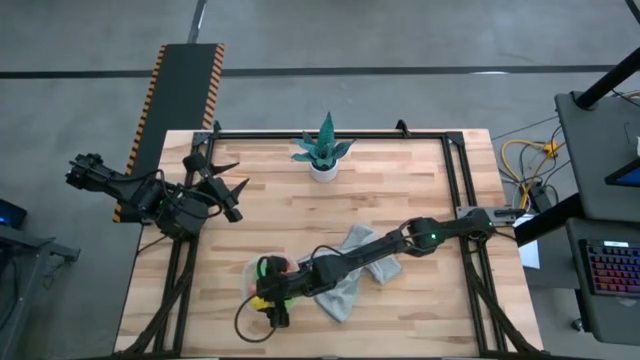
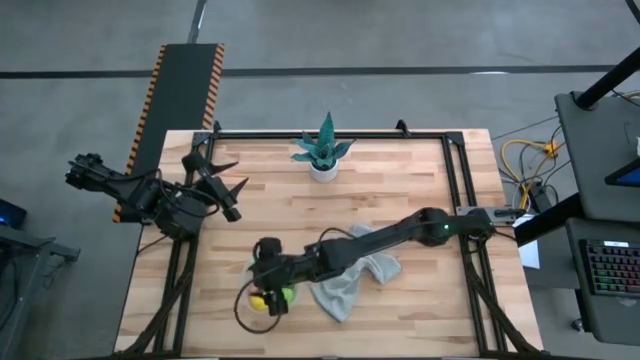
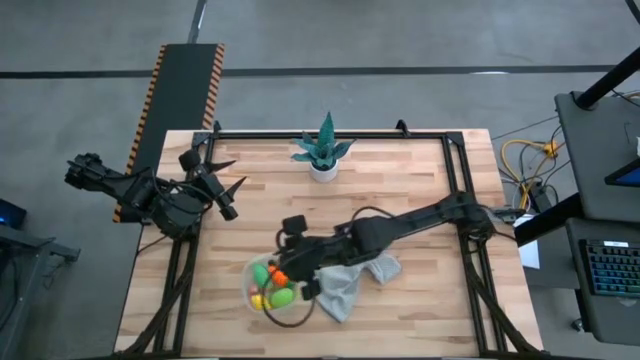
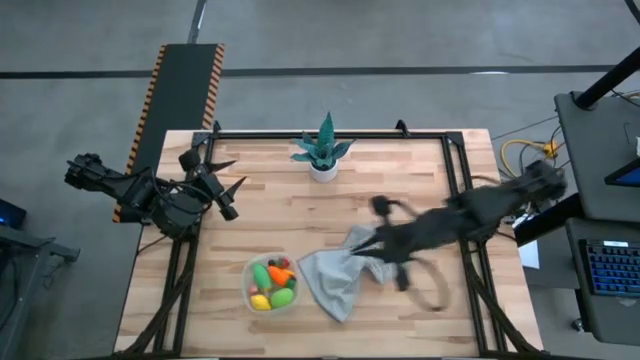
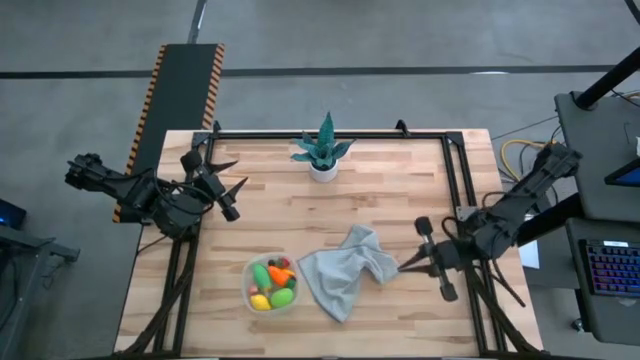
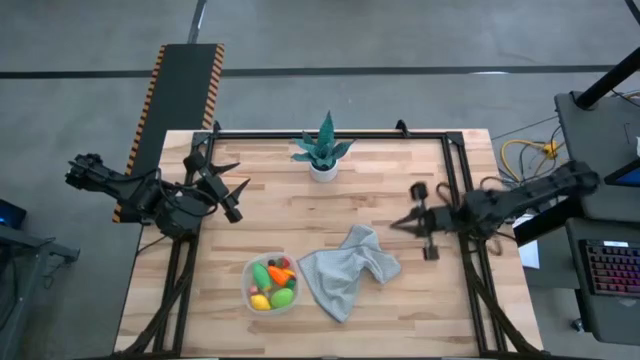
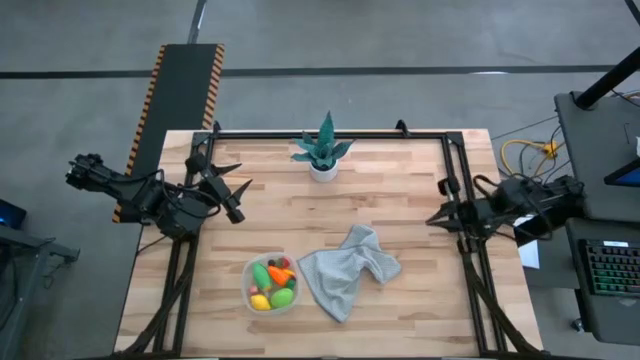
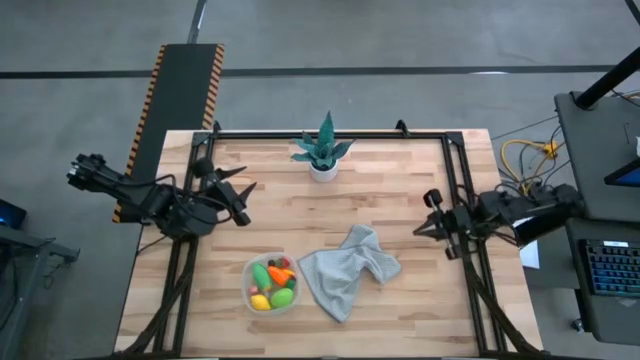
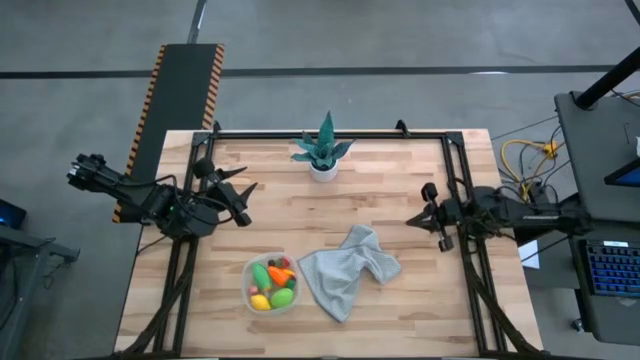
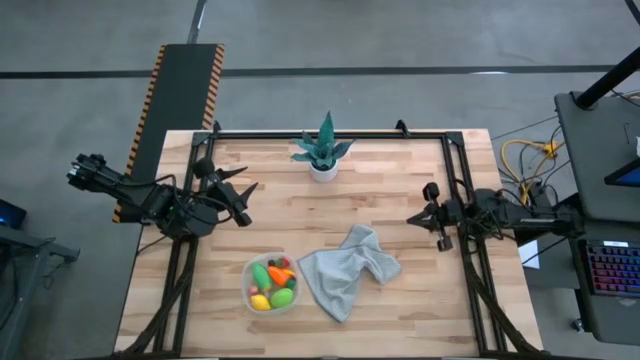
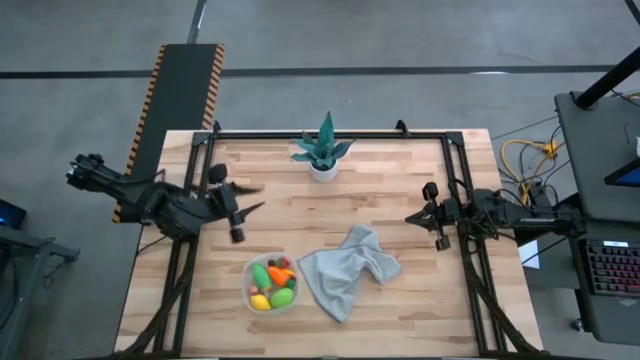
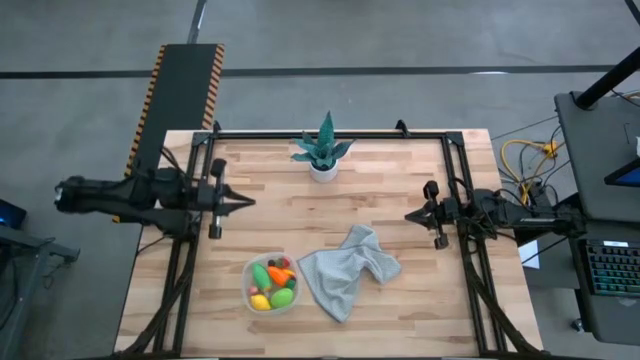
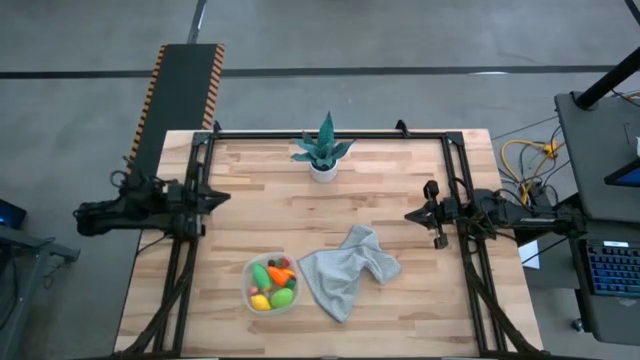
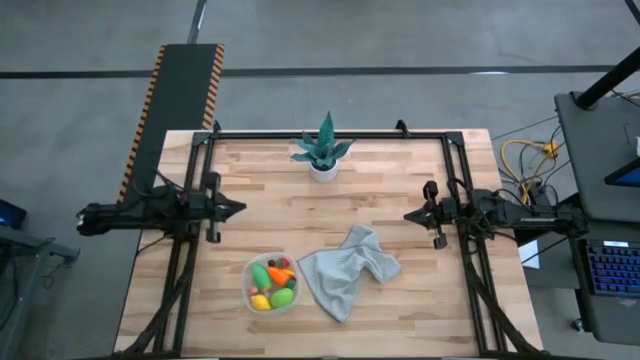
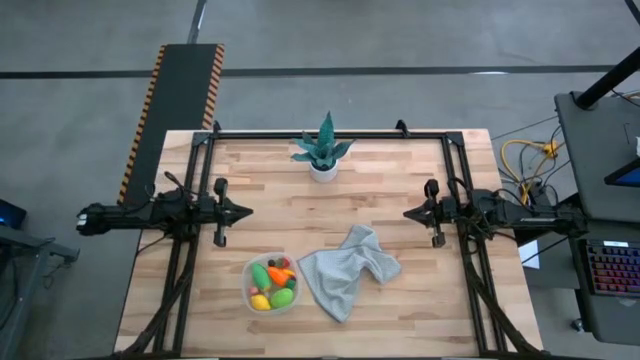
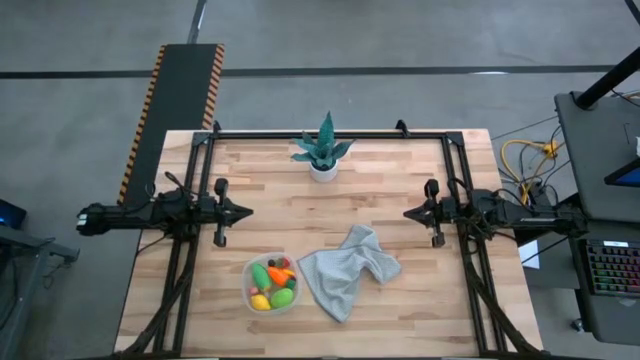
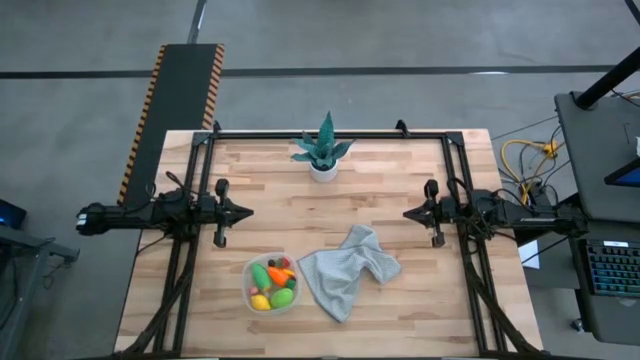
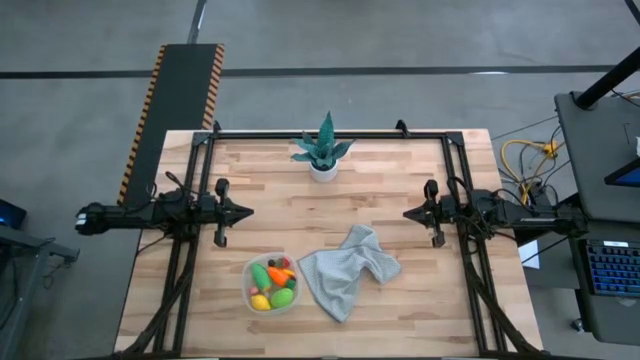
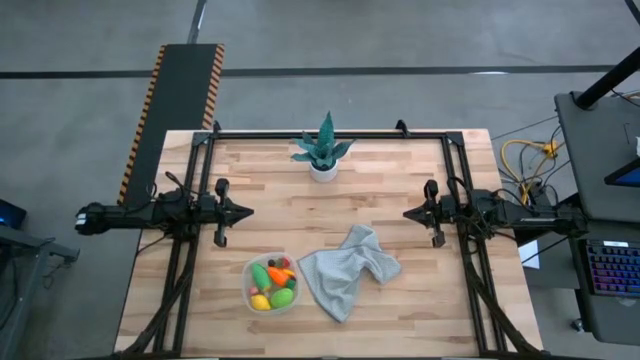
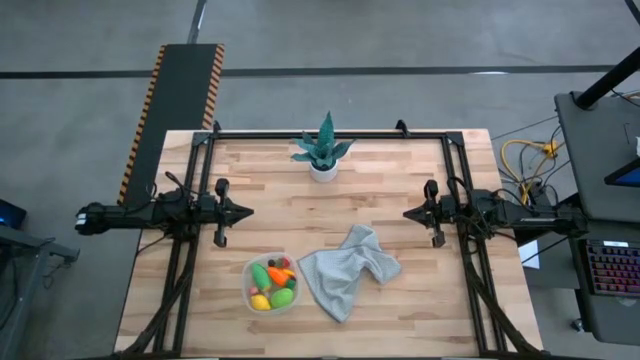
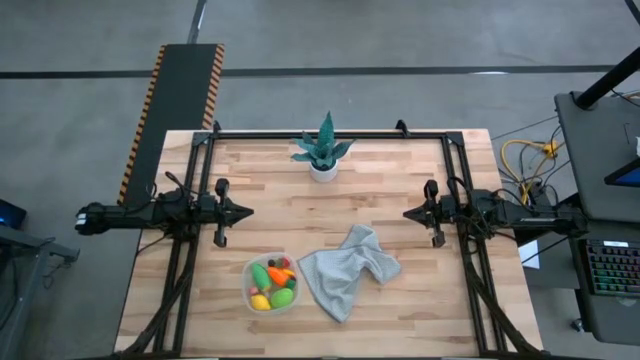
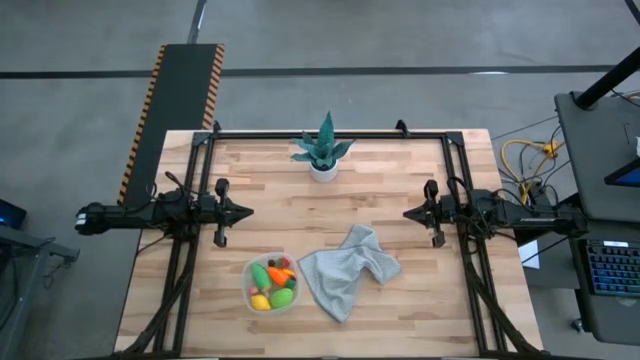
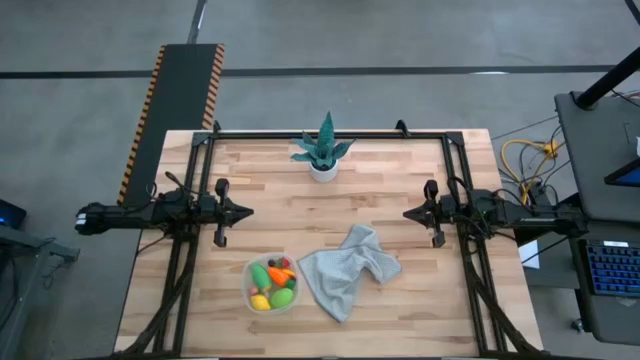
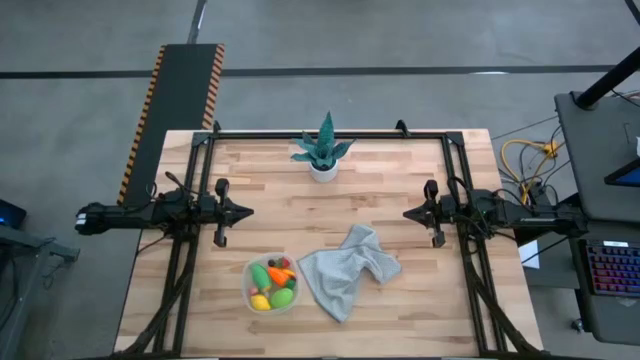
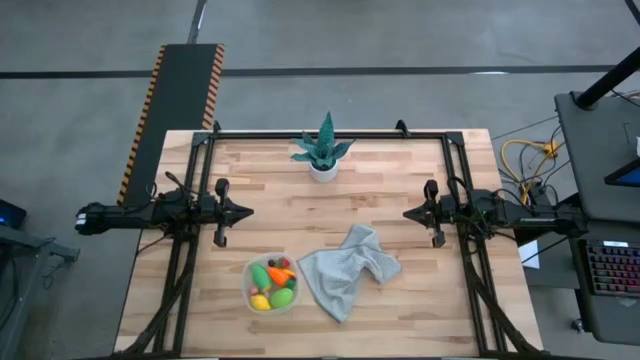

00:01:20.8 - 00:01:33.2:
Task: Pick and placing Produce into tupperware
Return to Home Position

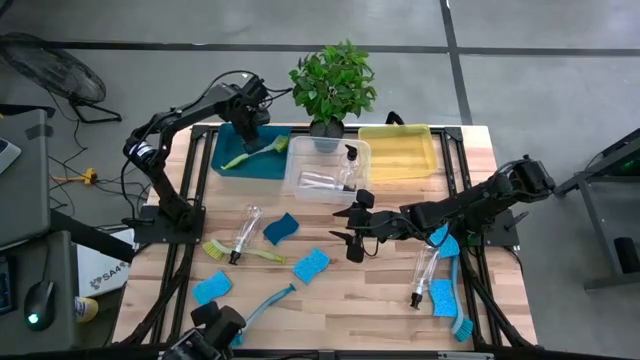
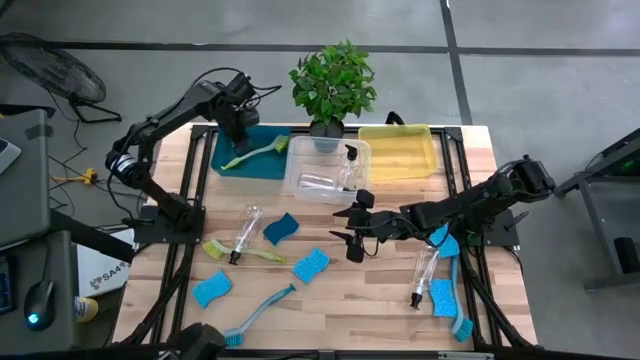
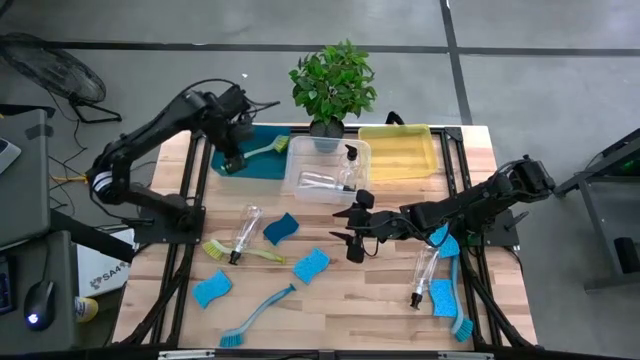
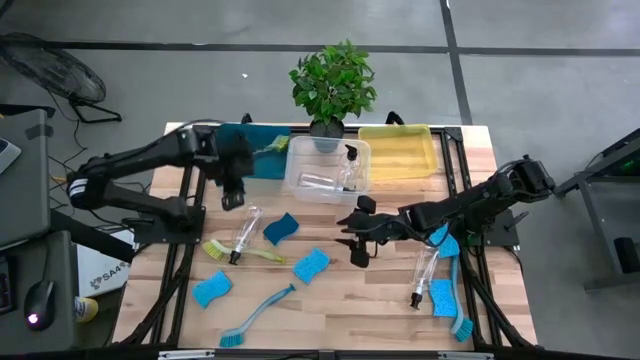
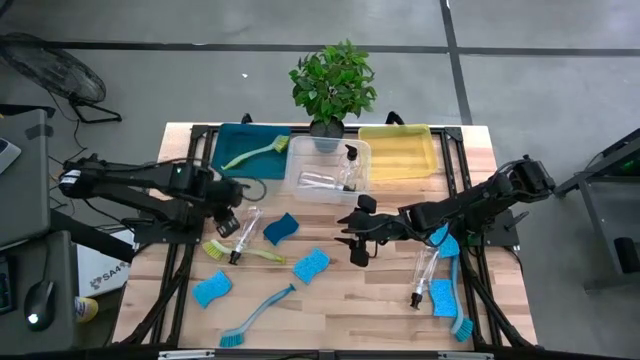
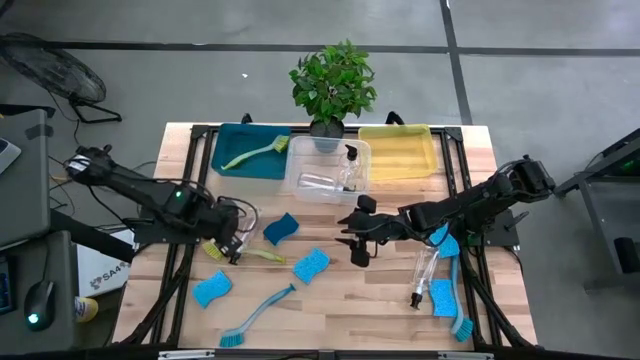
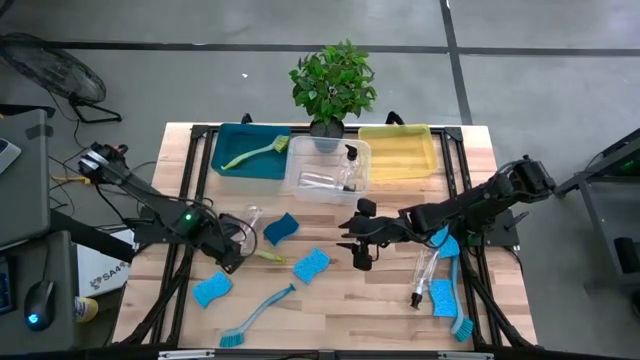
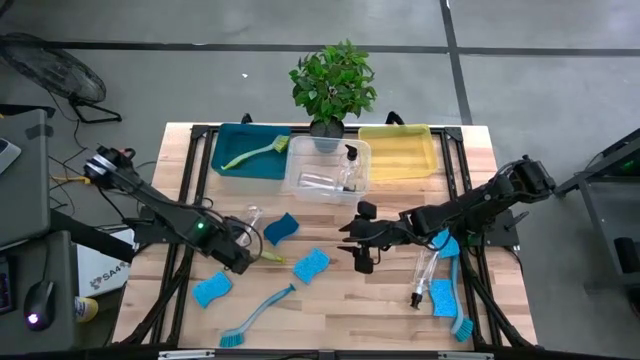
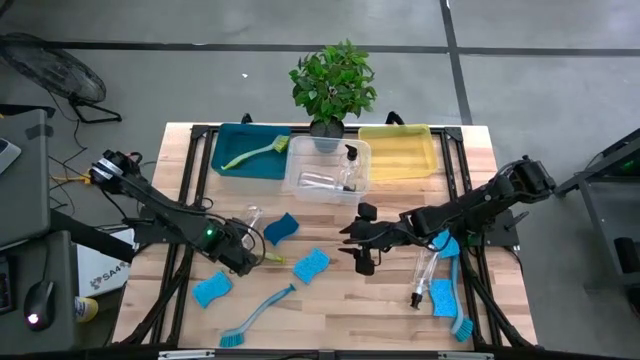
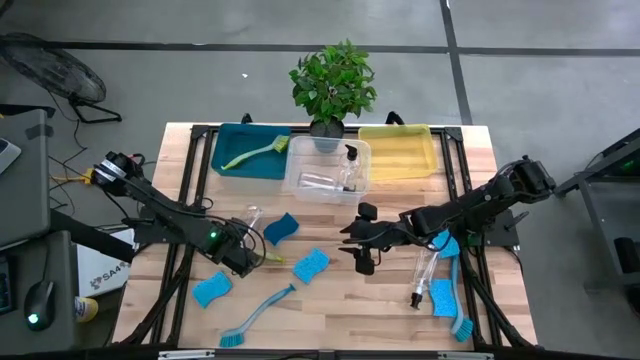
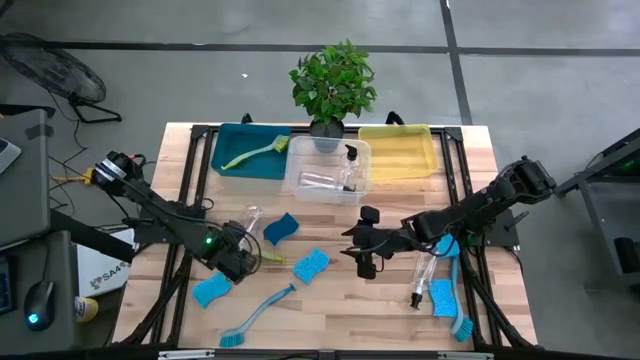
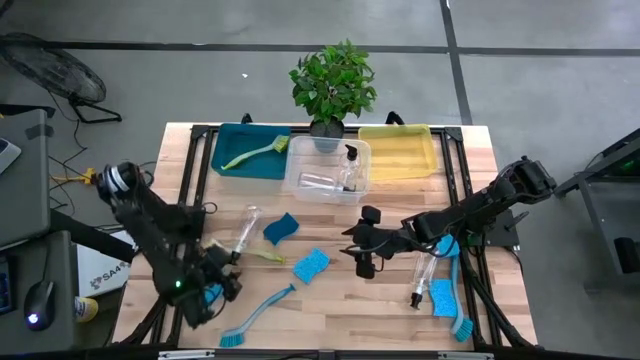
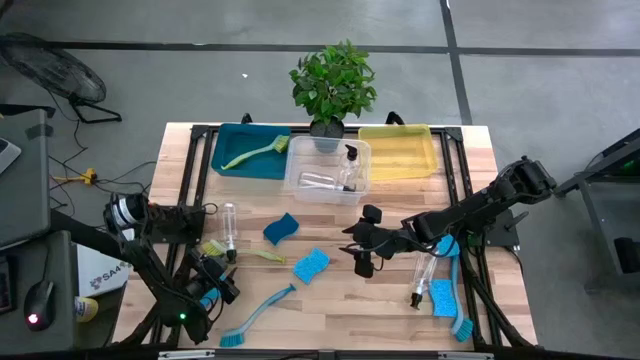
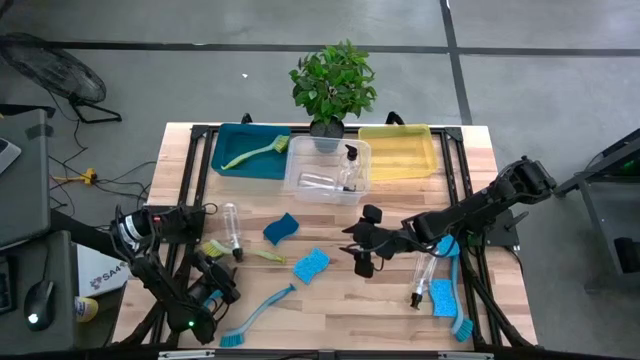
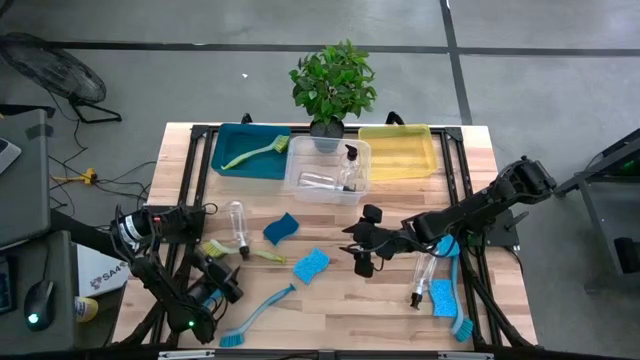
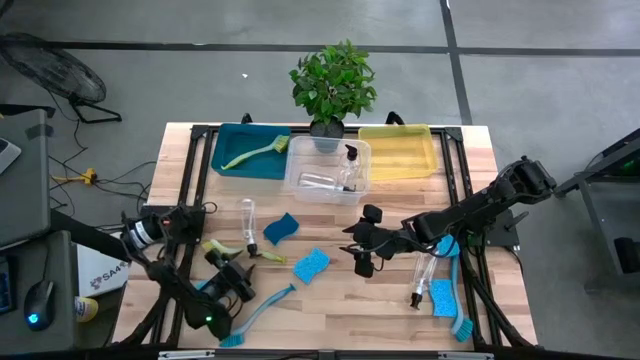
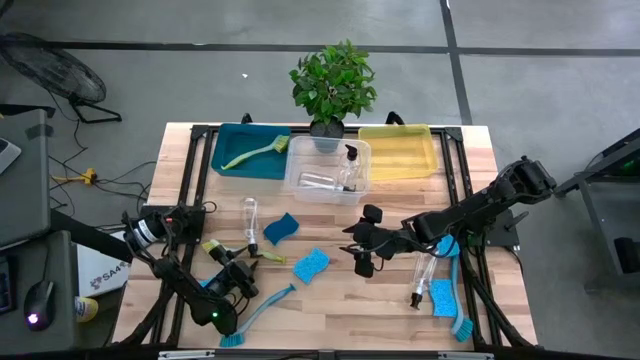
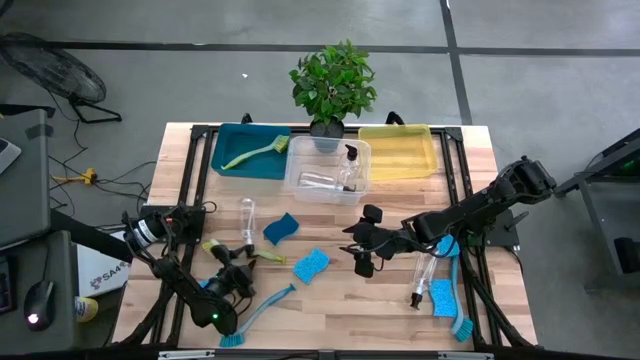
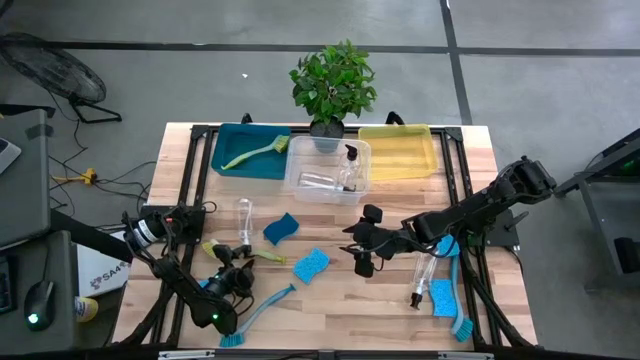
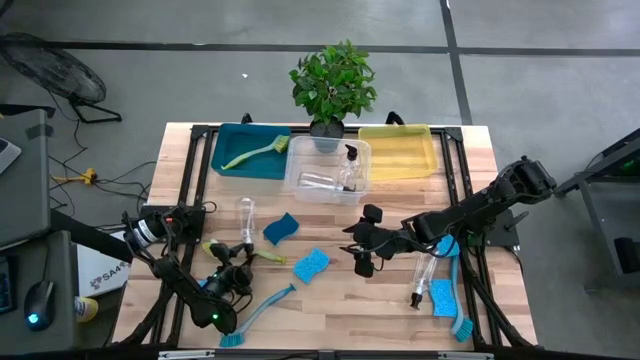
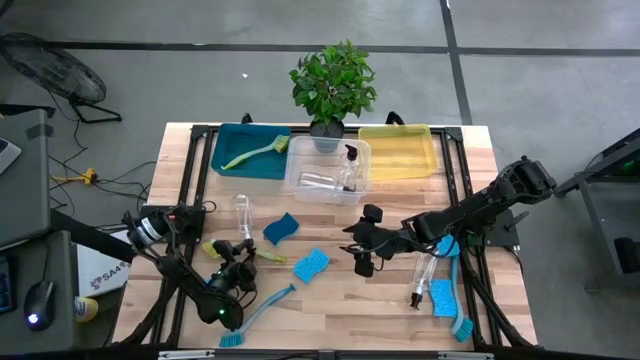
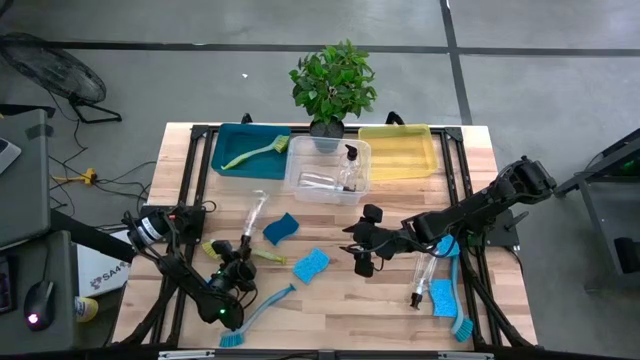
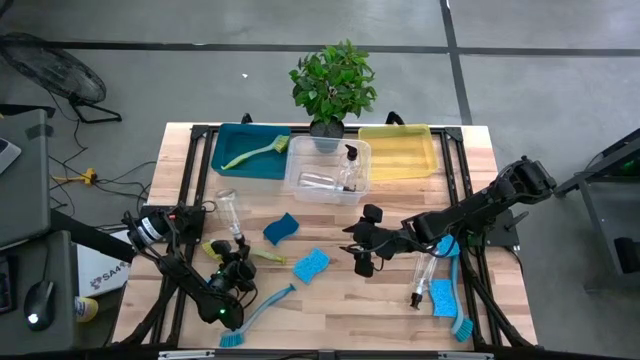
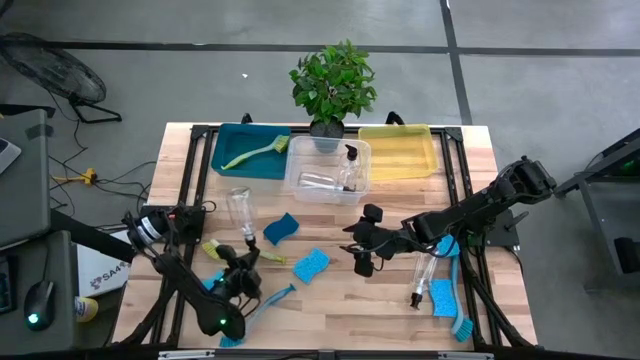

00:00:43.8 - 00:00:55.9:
Task: Pick & Place Kitchen Sink Supplies
Put the transparent soap dispenser into the transparent bin
